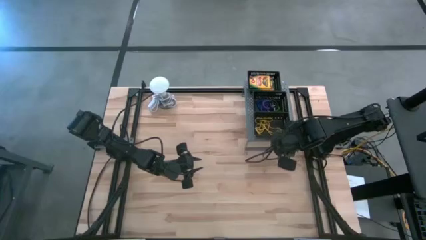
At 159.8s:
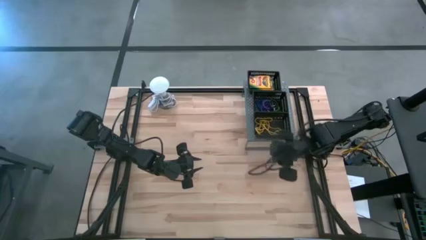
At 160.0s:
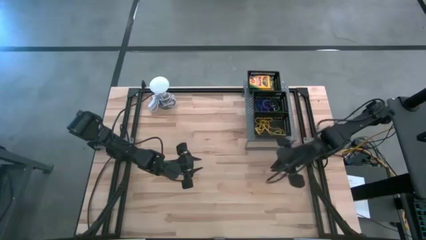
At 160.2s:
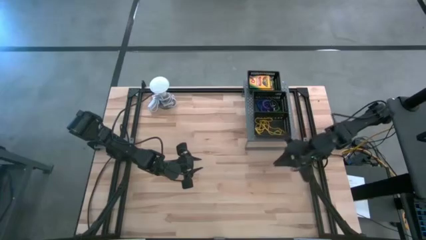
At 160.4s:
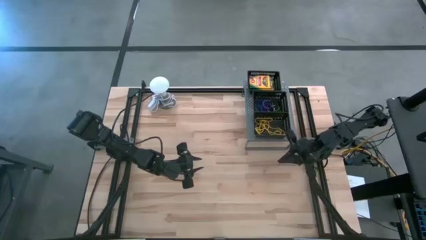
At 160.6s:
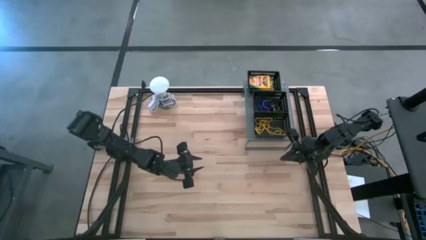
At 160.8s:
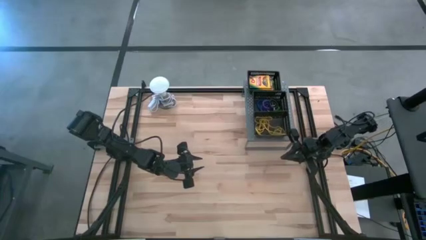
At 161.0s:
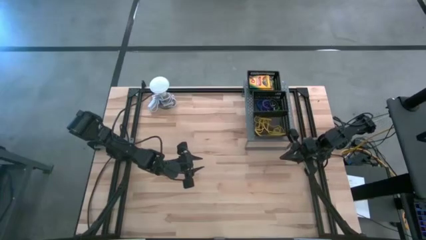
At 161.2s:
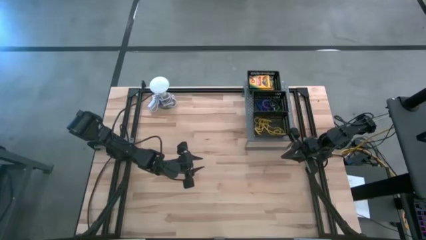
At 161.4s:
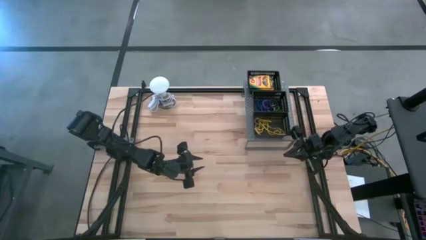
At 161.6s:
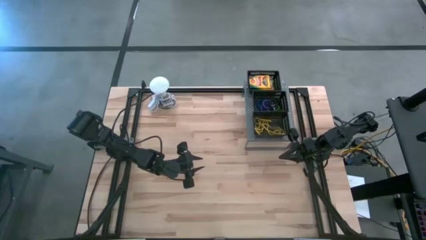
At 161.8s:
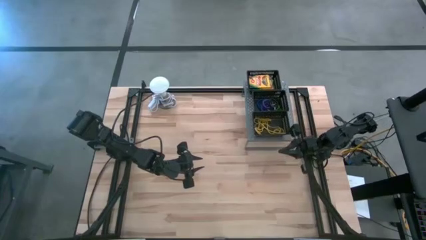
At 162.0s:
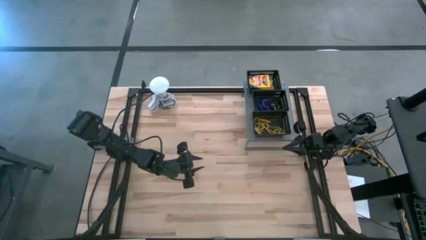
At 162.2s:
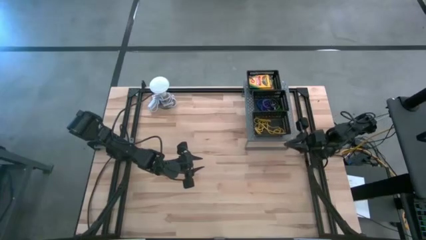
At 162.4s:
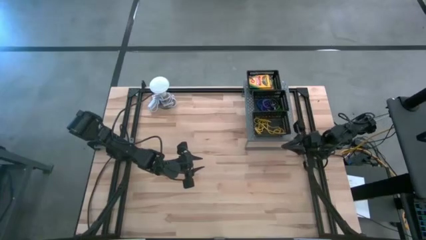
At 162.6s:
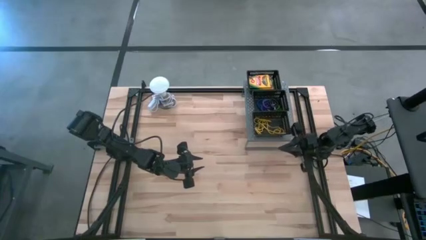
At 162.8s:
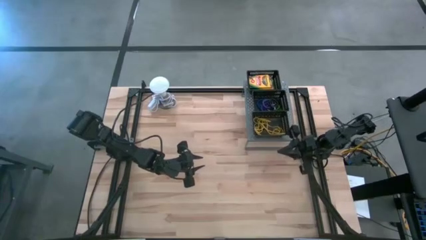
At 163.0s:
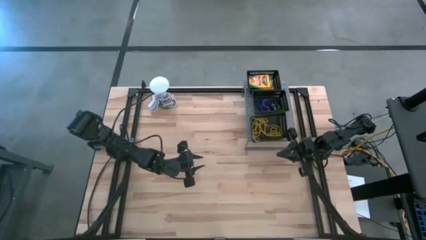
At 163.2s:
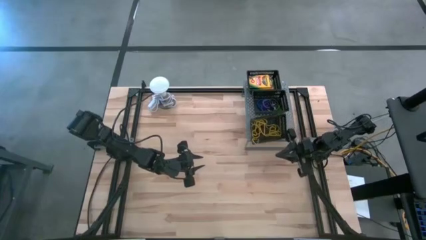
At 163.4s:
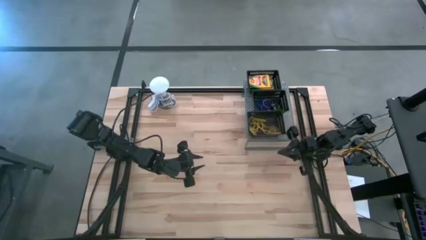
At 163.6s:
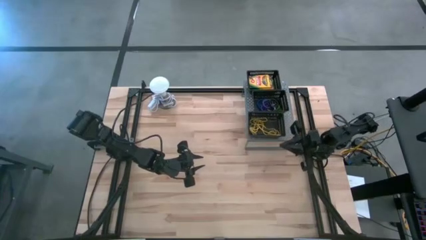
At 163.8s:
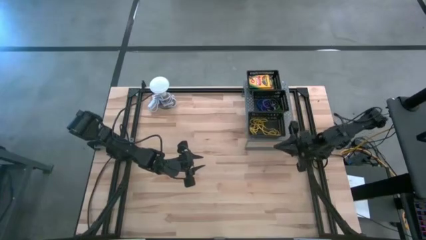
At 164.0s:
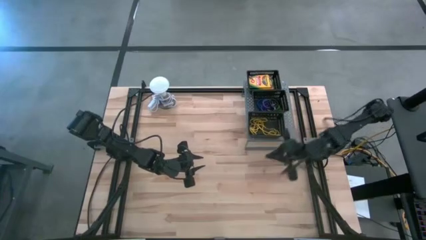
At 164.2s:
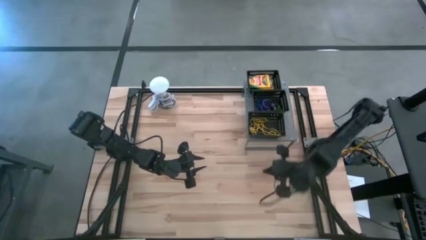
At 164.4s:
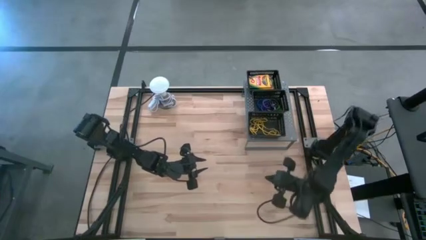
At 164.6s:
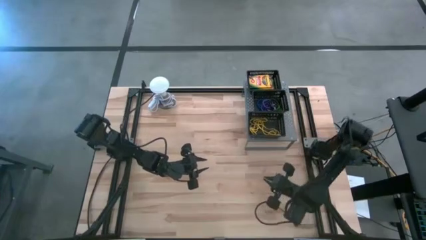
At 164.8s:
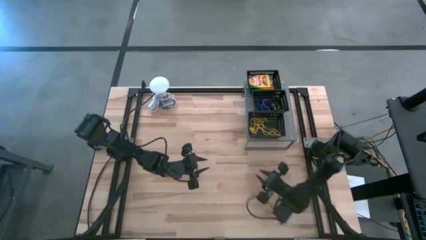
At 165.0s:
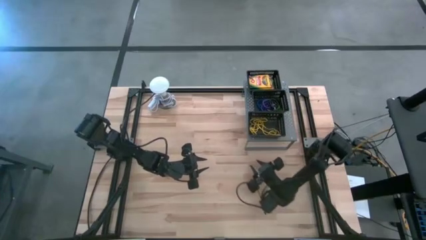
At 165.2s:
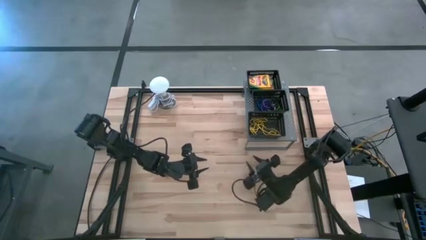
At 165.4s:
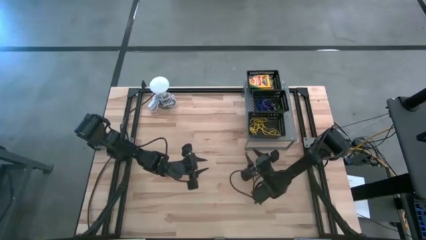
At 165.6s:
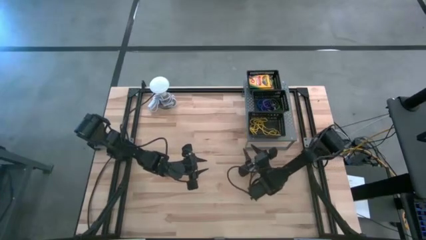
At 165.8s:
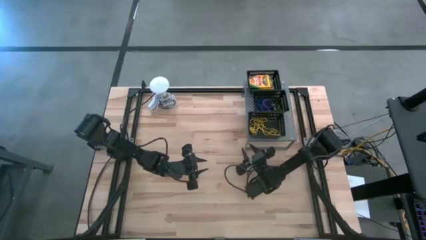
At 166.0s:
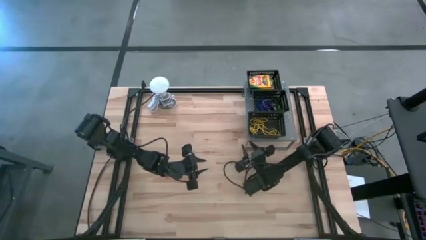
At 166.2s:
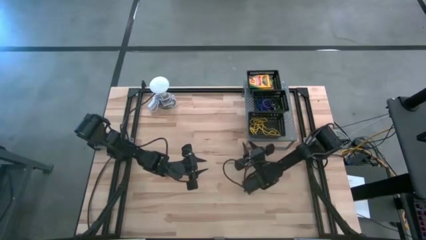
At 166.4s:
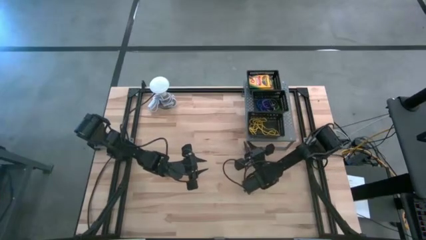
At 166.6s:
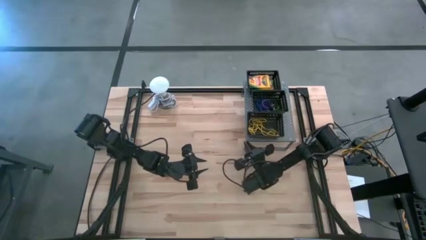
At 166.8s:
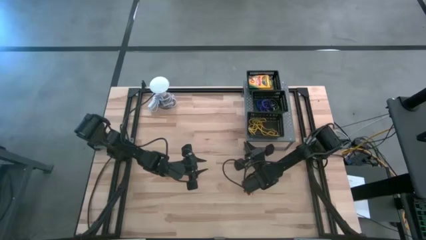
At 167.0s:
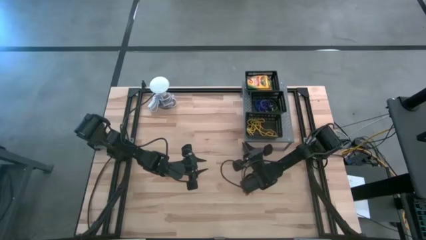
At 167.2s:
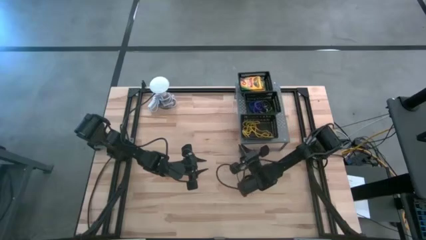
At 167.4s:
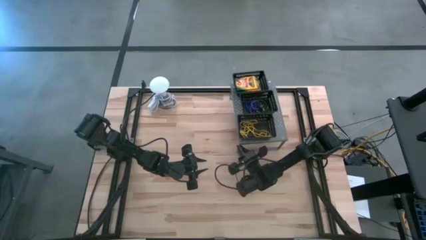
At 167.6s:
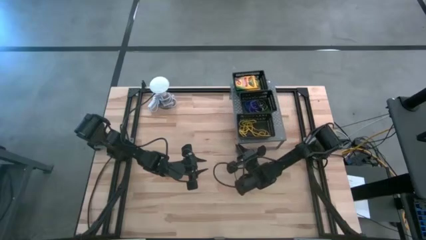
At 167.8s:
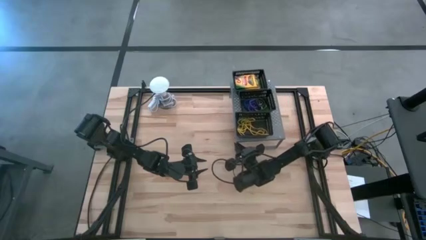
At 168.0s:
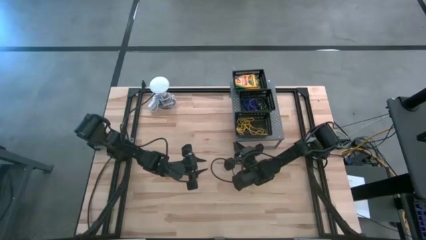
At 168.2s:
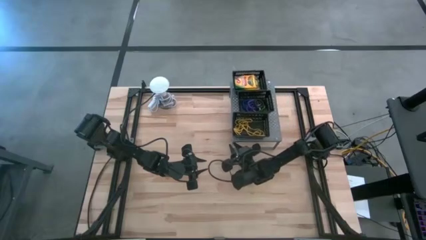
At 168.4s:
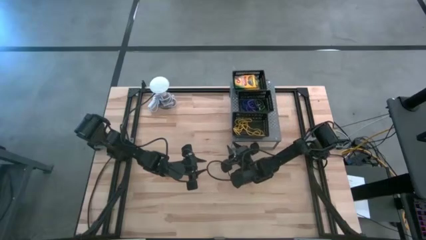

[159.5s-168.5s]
Task: Pick & Place Office Desk Supplies
Adjust the shelf

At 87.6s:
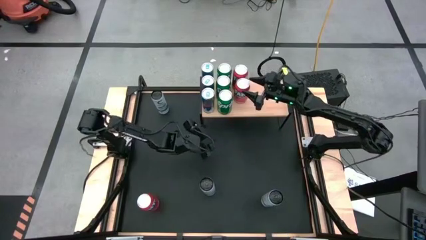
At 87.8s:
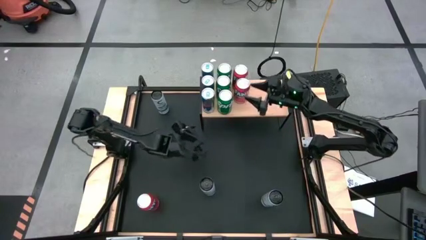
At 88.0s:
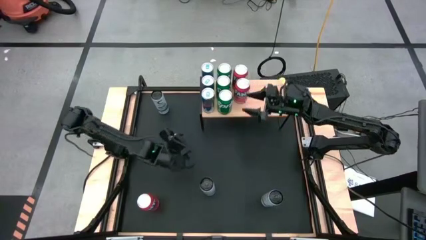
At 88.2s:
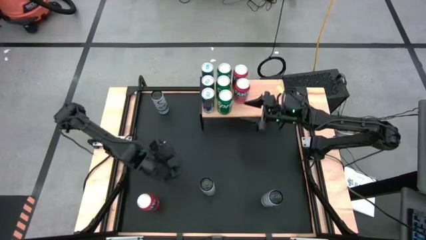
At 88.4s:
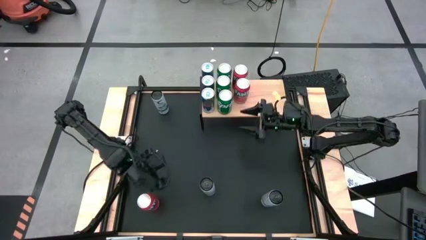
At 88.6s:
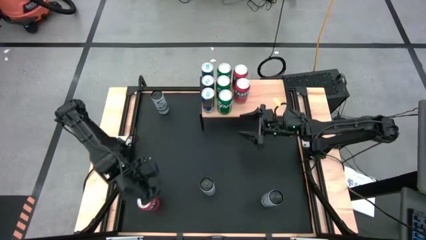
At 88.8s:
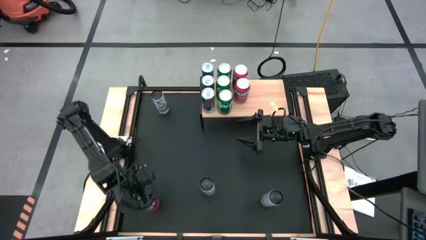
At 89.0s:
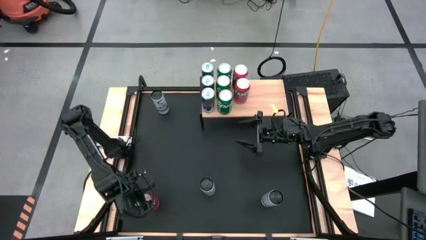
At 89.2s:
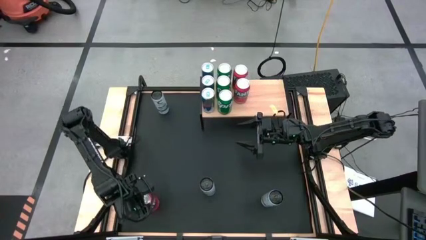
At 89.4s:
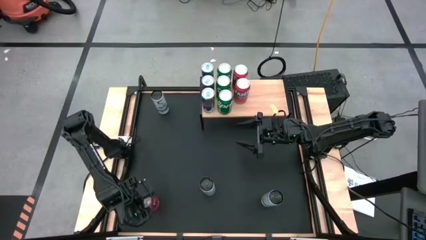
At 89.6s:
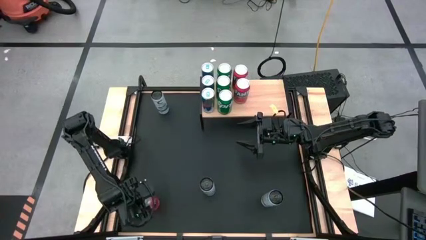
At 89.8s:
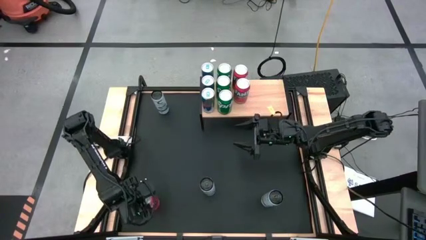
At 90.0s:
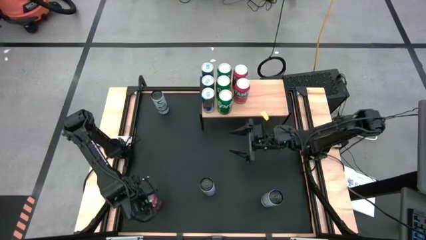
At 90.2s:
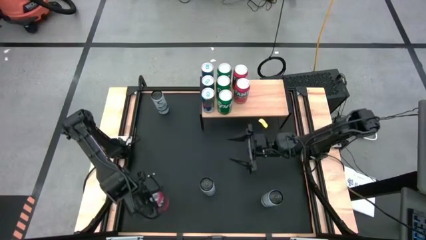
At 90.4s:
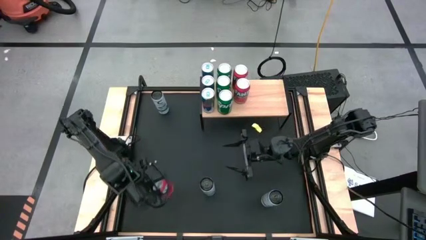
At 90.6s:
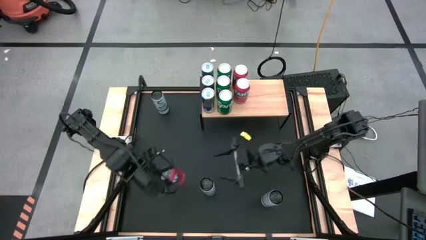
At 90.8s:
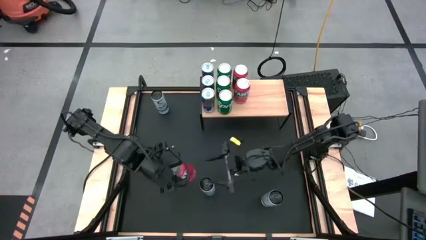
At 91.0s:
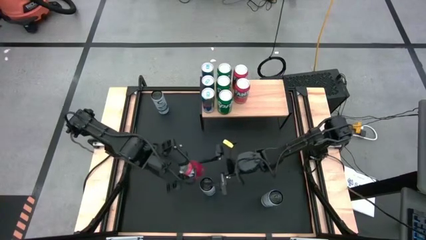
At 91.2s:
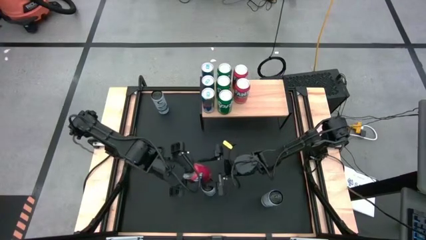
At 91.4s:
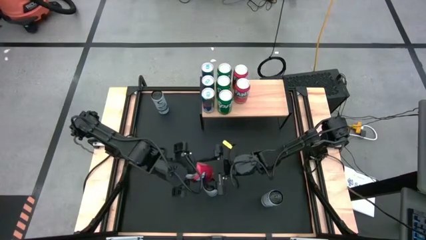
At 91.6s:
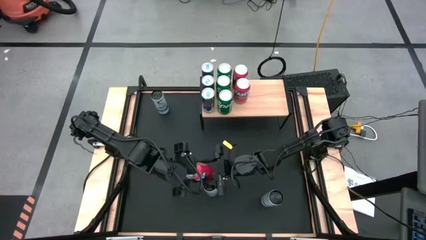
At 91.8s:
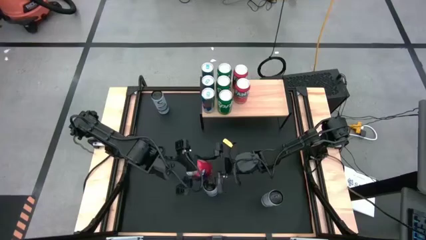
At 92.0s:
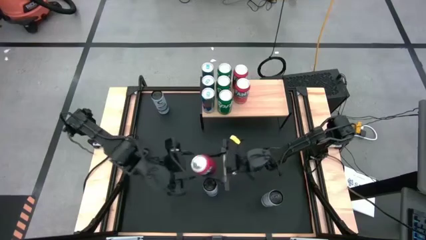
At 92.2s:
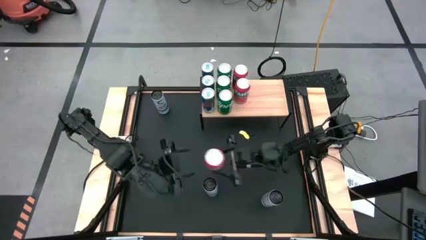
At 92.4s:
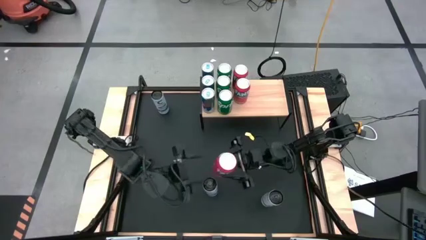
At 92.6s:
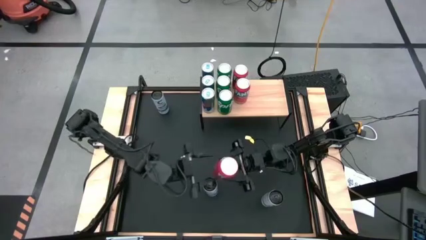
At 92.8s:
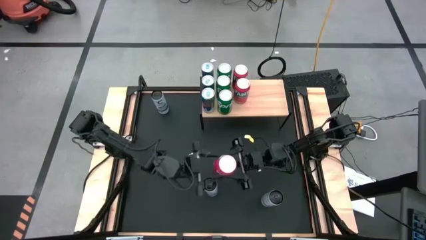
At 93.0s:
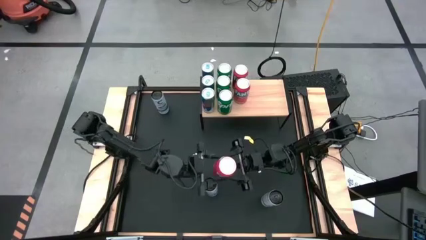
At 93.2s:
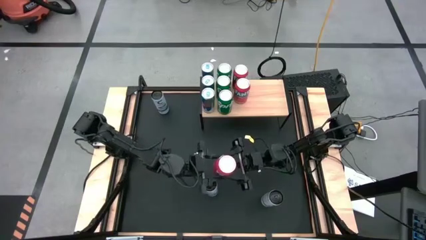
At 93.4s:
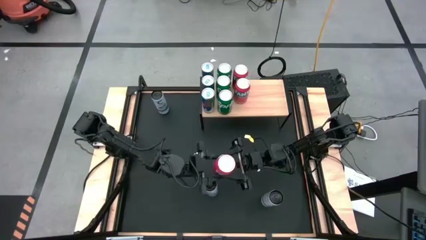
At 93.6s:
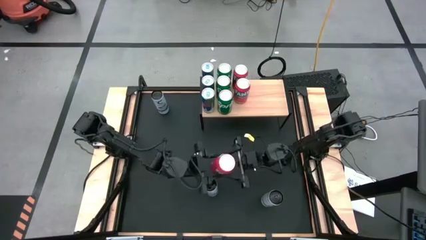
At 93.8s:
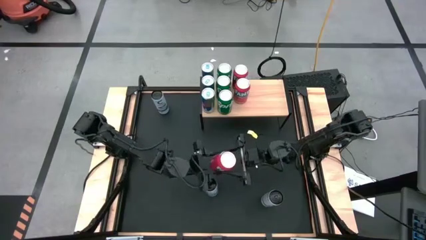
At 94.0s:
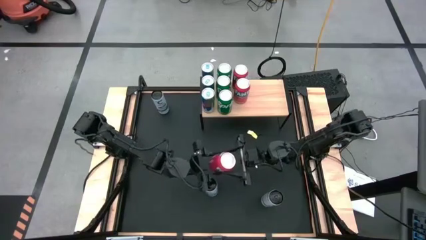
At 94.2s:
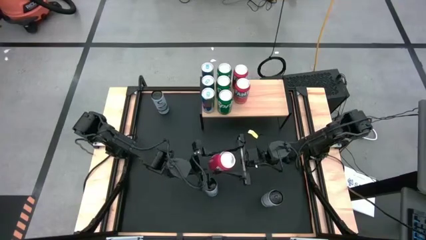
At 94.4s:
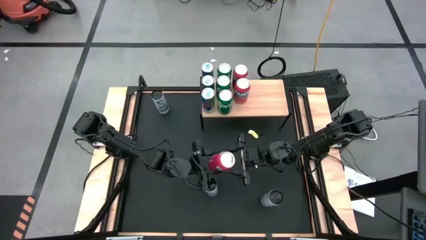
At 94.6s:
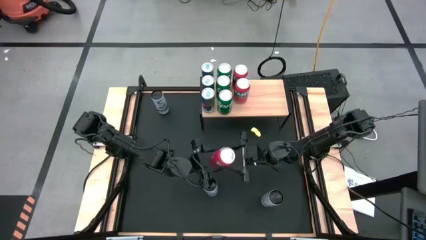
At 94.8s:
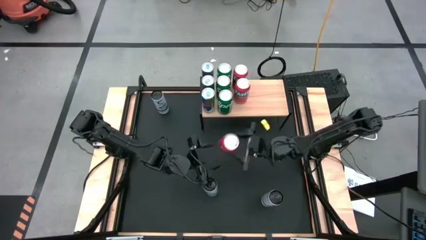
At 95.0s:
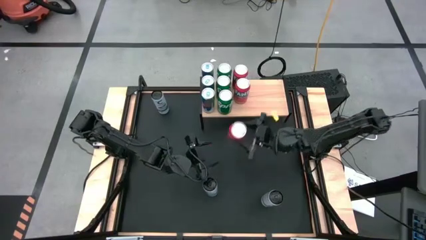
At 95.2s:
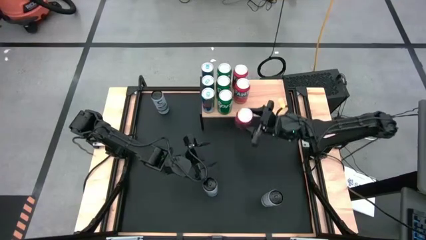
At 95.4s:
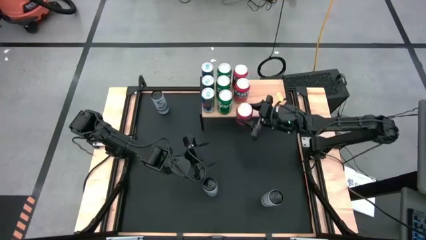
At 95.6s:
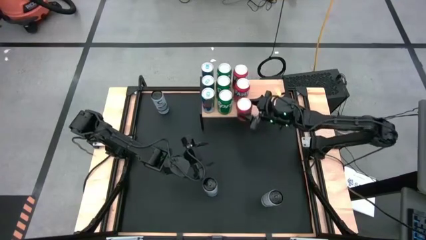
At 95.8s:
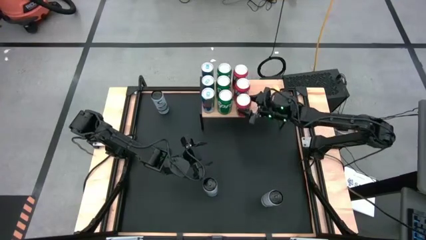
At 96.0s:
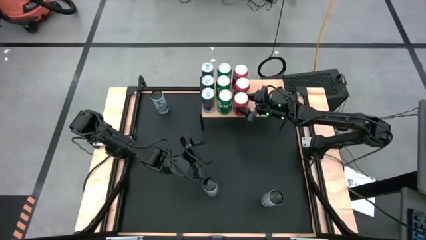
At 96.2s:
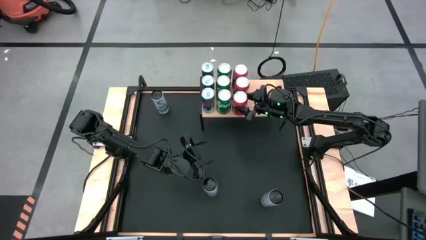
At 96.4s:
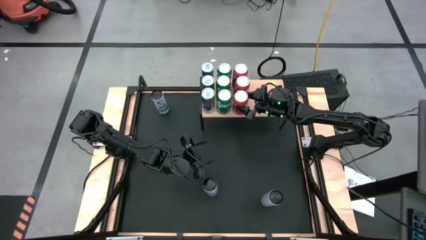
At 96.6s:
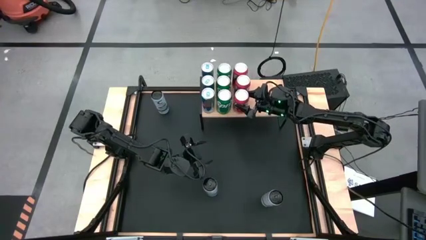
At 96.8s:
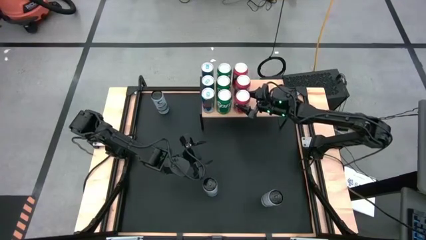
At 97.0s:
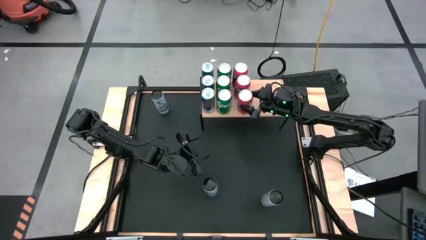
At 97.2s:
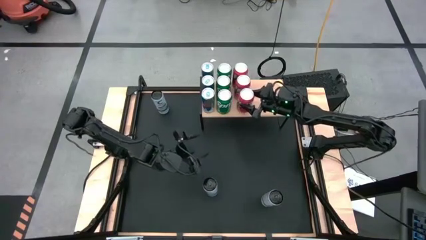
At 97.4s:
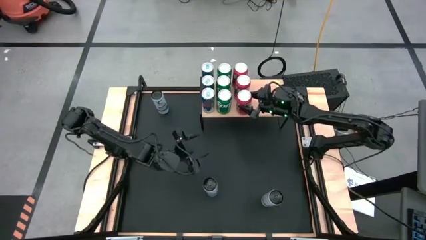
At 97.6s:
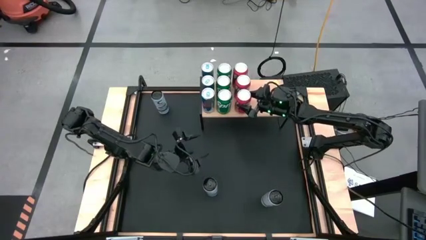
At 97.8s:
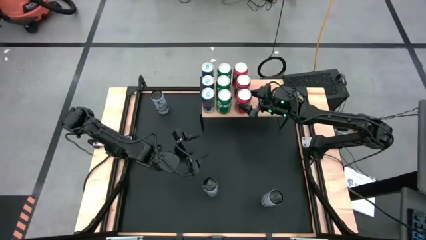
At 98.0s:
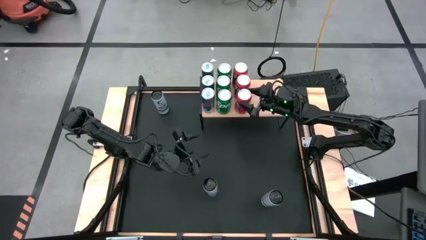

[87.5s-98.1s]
Task: Place canned beverage on shelf
Put the red soda can on the shelf aligned with the other red soda cans
